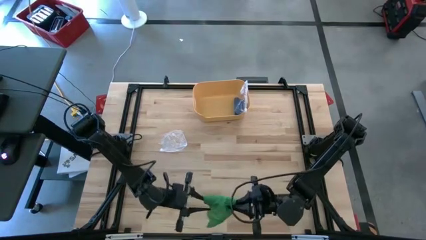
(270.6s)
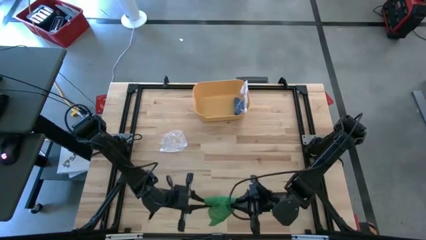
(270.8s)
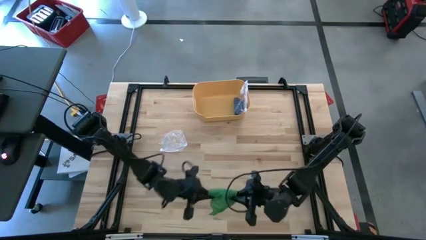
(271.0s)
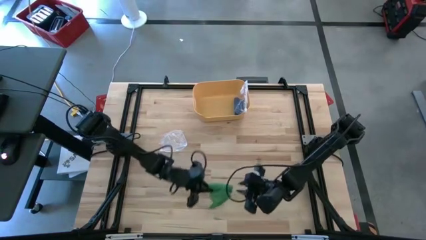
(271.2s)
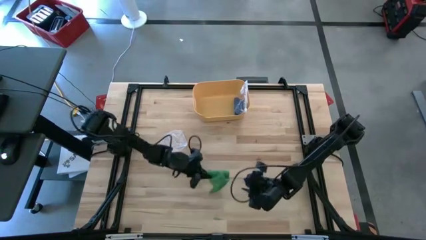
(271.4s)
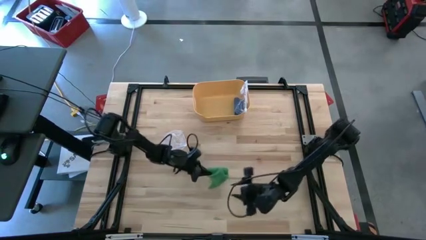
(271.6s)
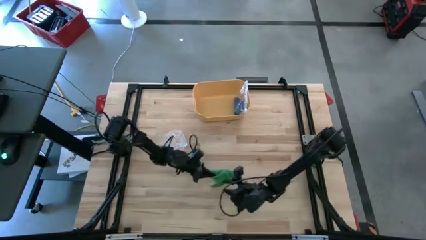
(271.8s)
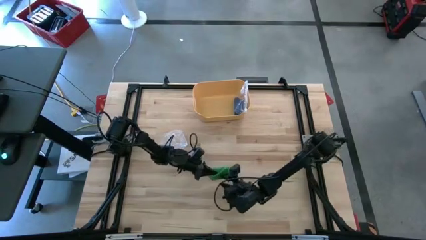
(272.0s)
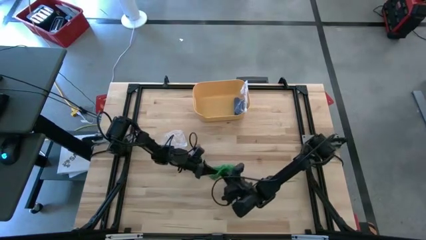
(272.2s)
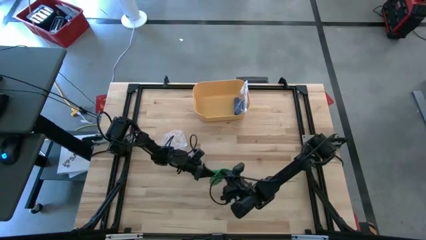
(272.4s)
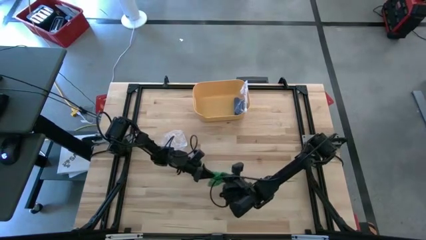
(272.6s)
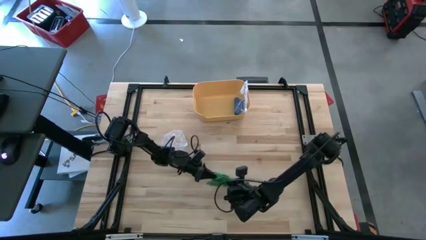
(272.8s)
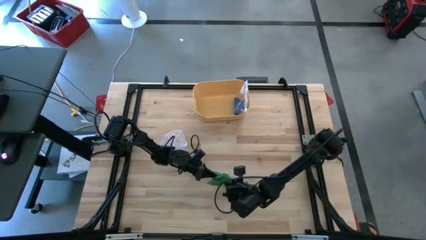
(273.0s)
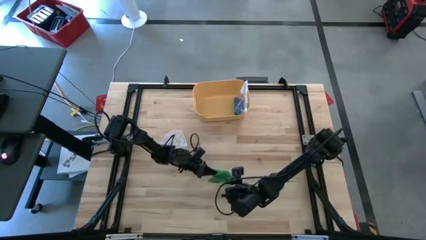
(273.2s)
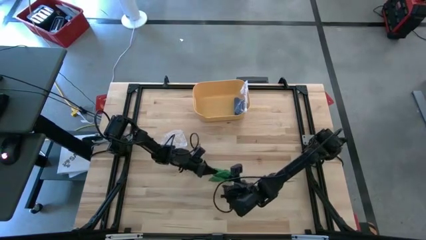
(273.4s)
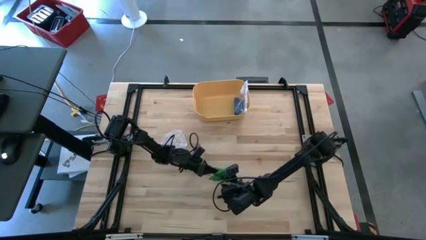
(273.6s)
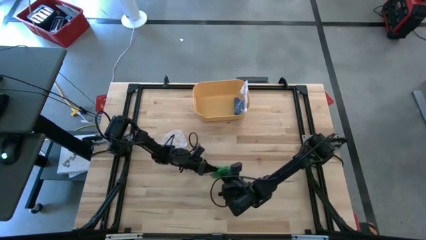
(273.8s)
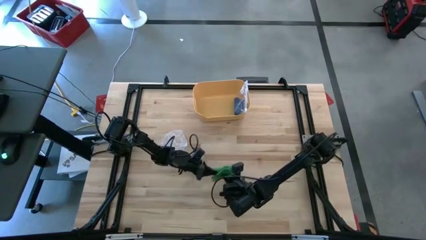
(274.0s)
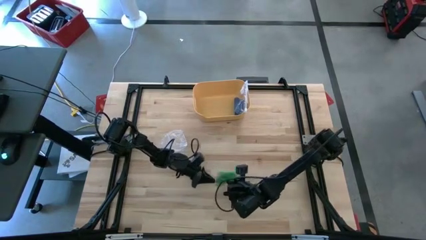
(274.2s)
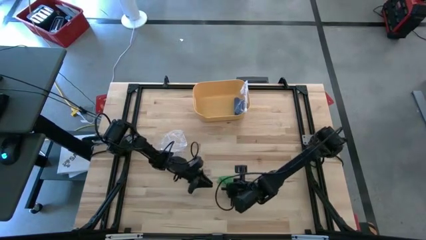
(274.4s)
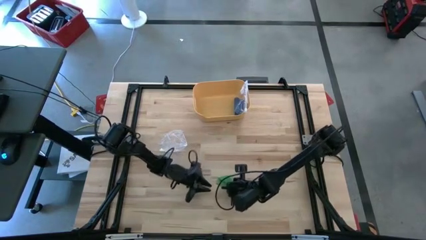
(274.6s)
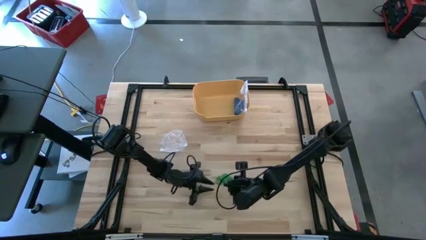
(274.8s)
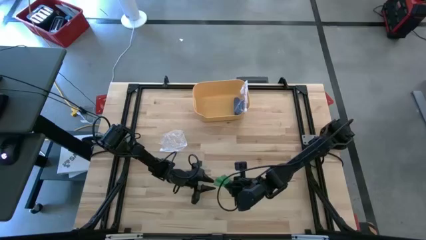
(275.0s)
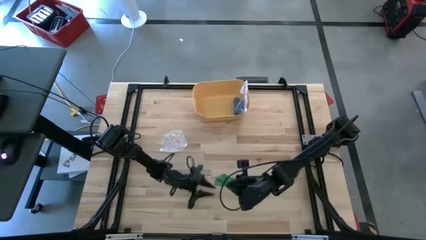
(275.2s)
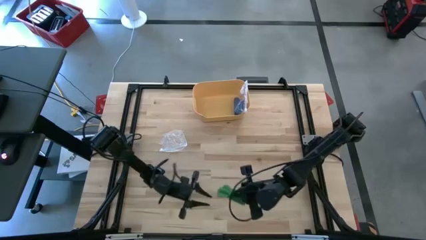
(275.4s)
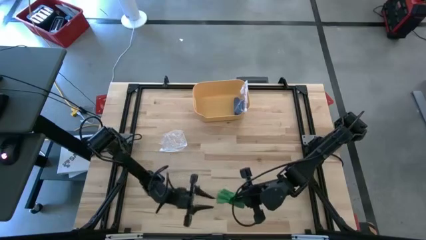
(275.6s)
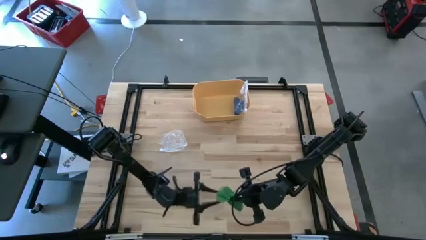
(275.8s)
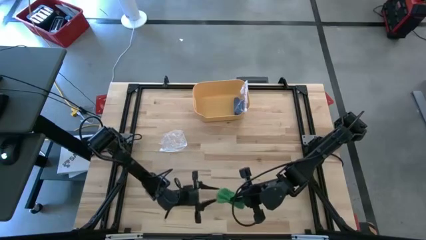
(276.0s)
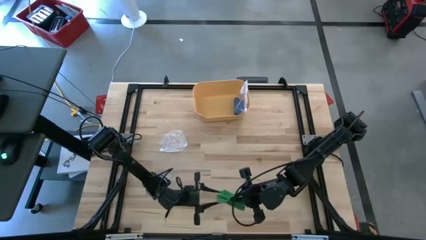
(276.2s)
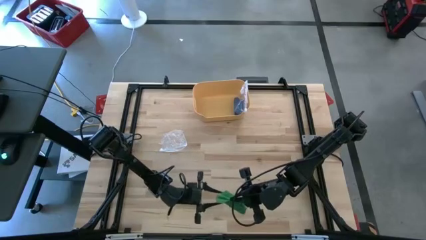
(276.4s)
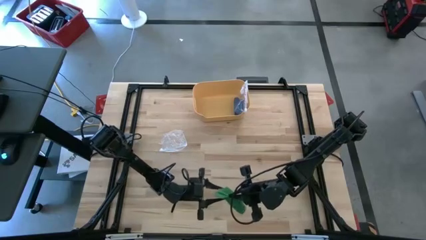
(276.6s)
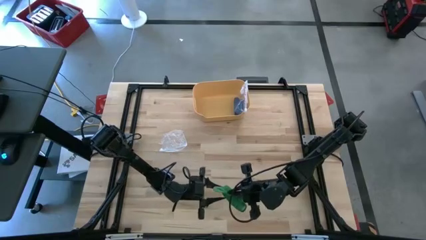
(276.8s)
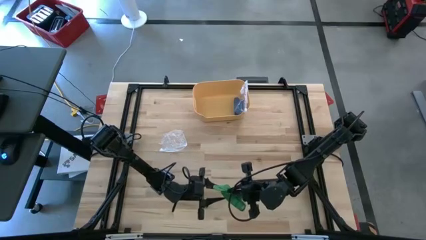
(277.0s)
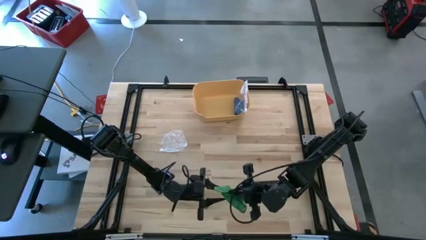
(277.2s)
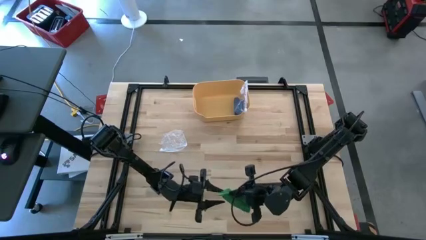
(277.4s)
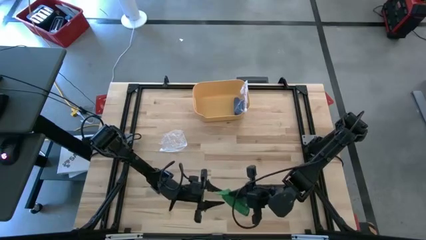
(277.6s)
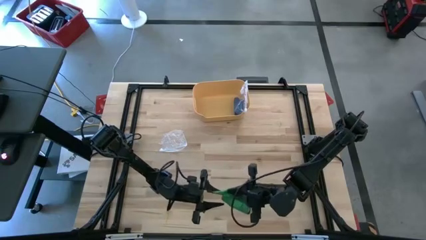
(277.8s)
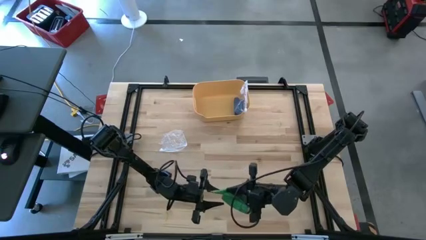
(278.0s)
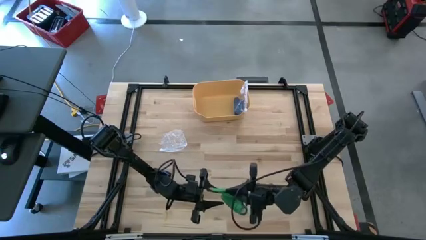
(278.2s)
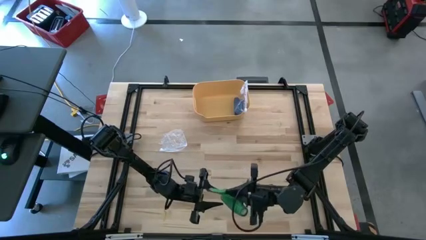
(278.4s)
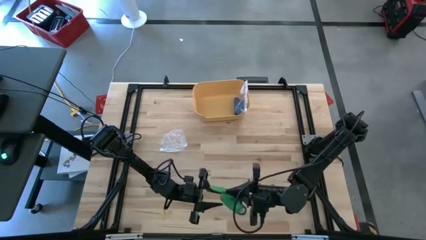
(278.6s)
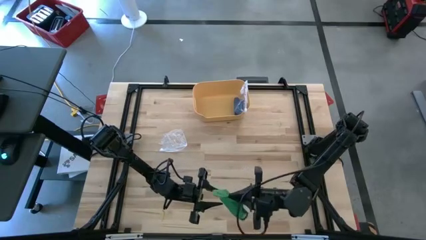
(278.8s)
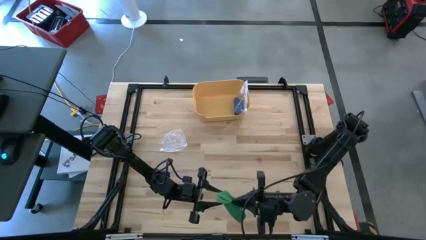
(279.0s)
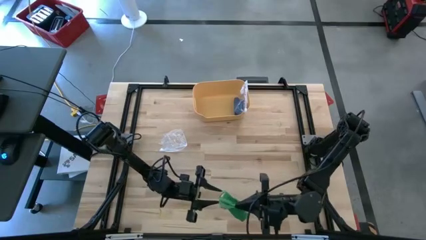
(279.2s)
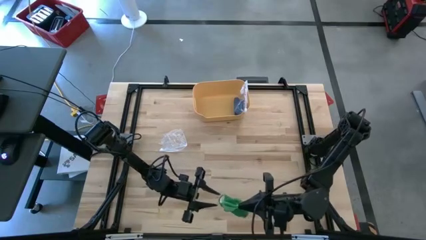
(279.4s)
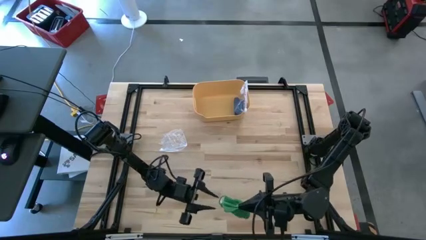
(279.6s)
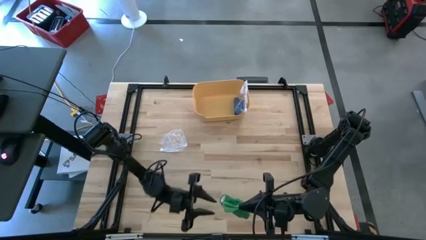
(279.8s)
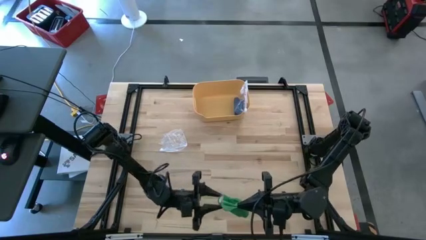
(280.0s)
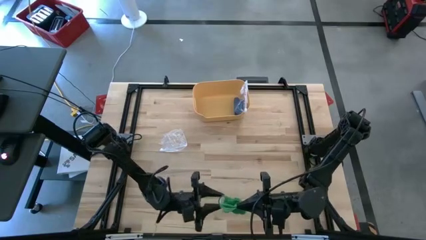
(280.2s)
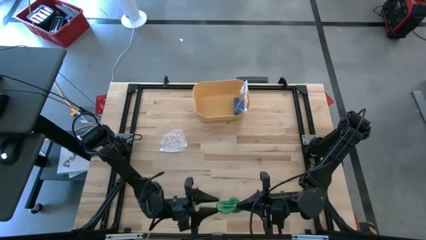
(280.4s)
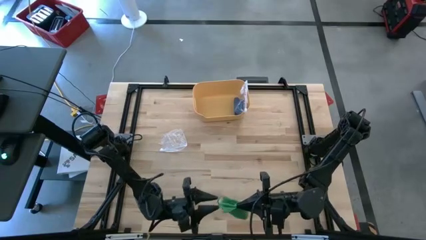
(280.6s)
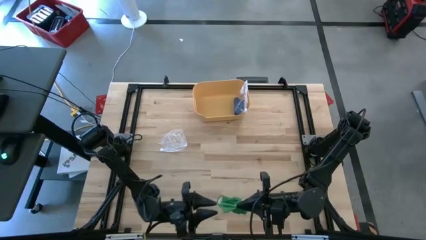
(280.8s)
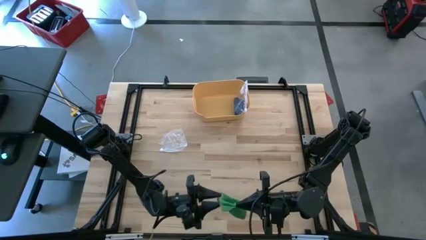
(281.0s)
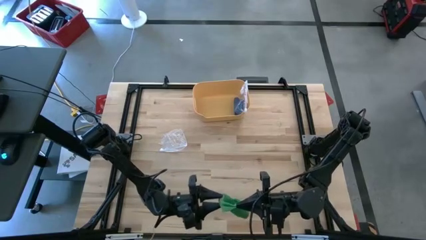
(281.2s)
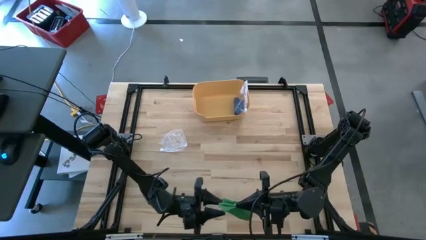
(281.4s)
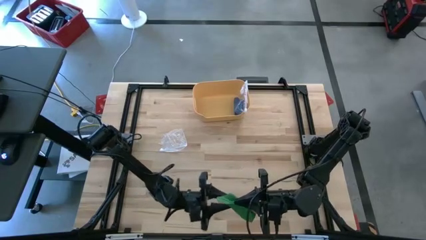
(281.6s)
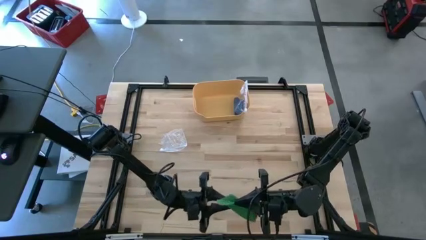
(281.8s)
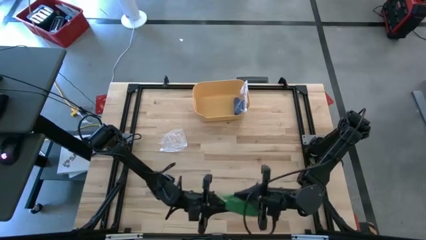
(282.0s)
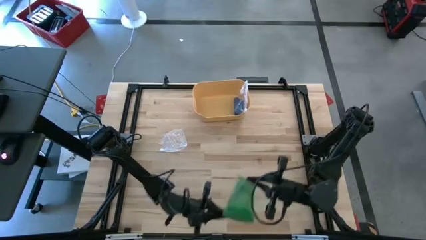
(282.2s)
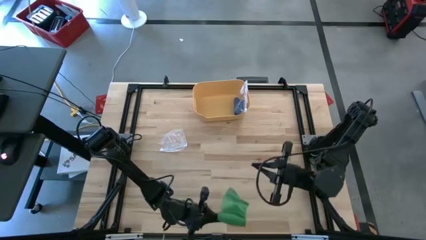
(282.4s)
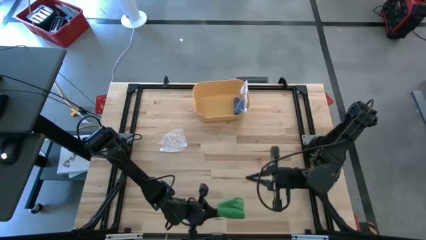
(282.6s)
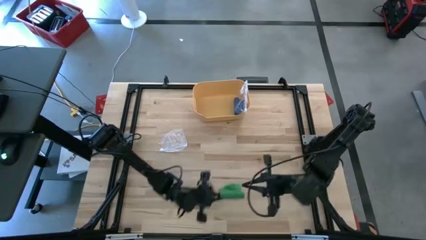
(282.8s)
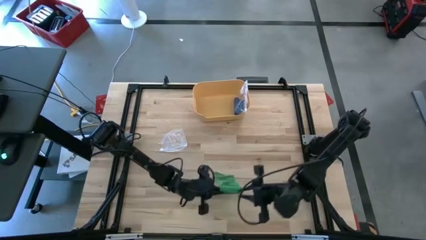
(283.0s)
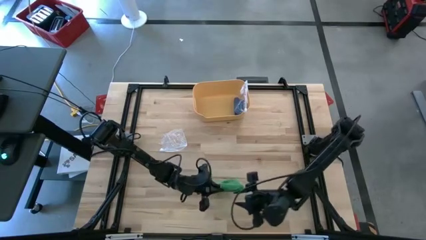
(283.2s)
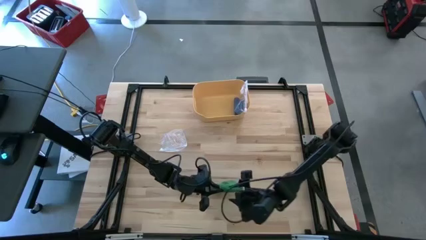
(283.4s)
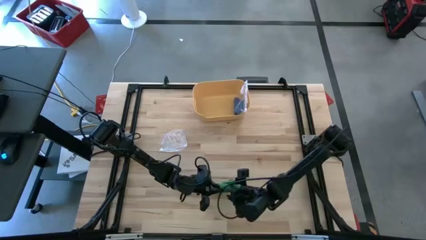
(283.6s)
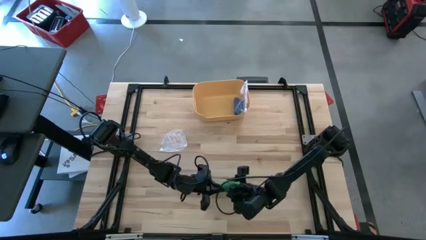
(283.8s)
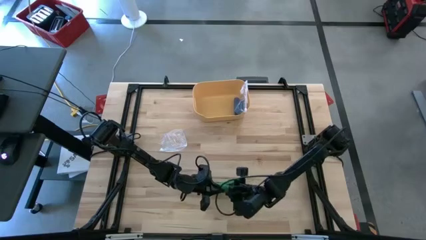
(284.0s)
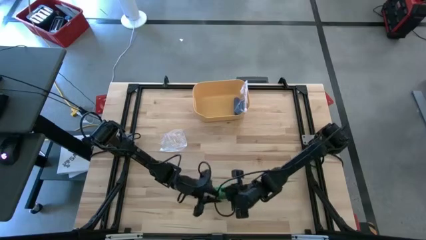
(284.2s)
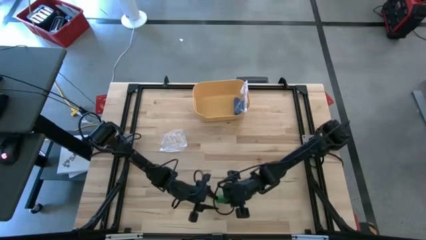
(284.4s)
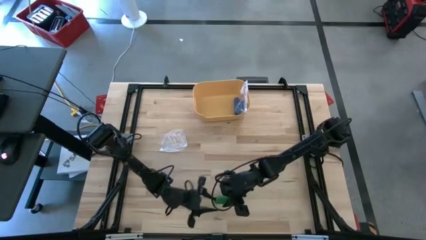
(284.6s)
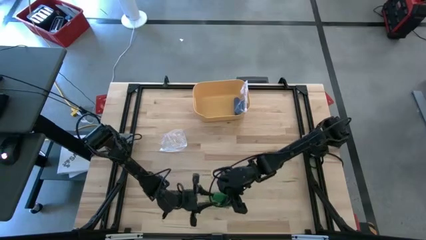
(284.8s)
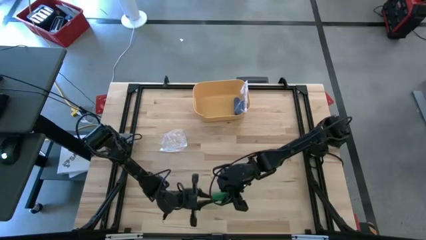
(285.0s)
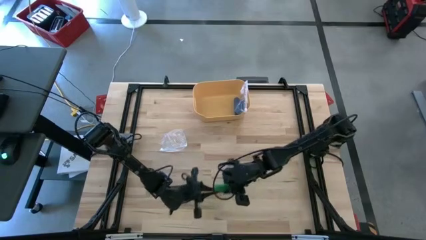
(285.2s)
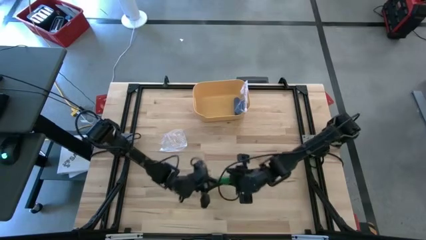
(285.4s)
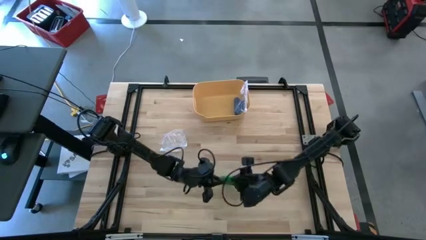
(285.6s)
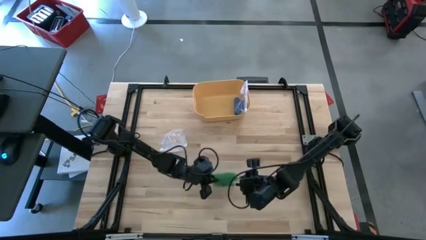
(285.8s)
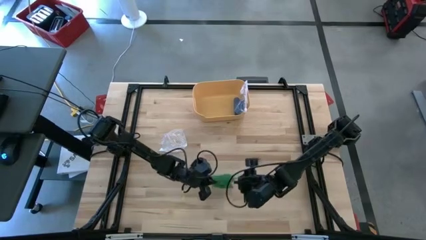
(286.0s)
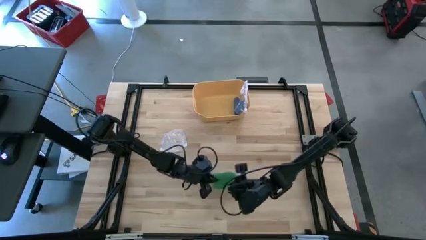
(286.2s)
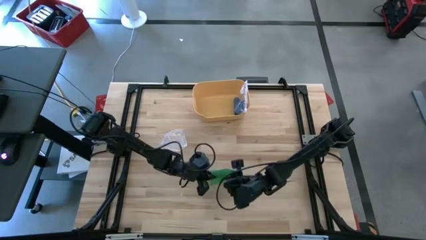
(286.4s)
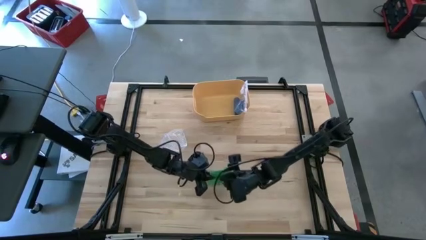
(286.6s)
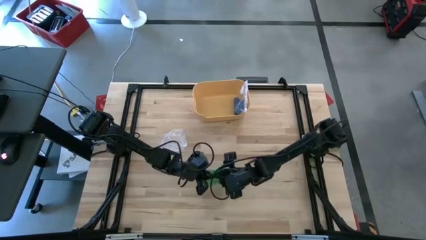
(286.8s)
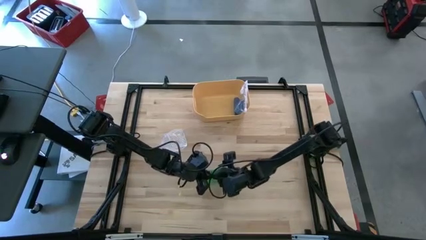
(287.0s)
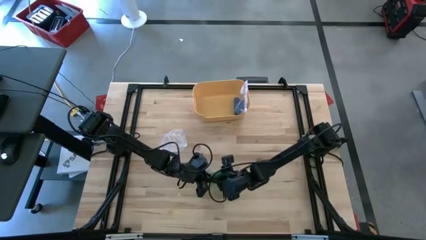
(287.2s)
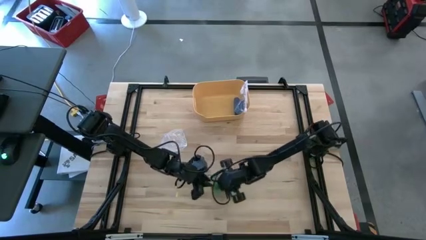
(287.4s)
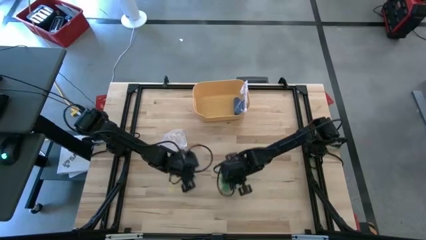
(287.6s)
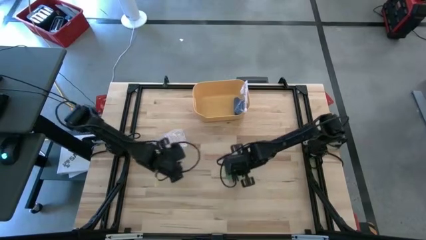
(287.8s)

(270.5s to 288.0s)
Task: Roll bandage
Roll the green bandage
